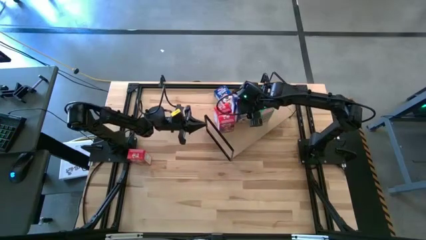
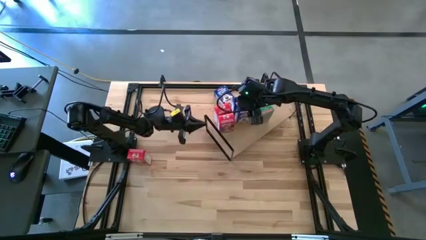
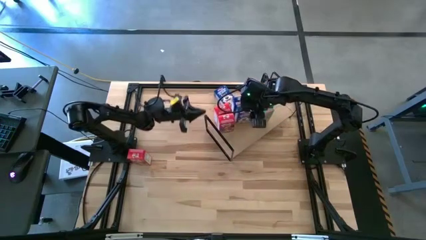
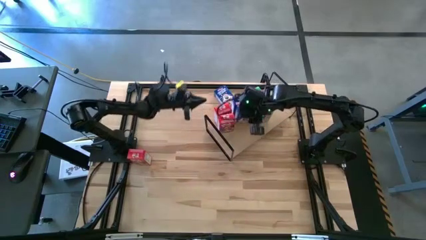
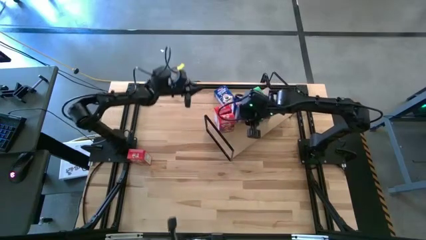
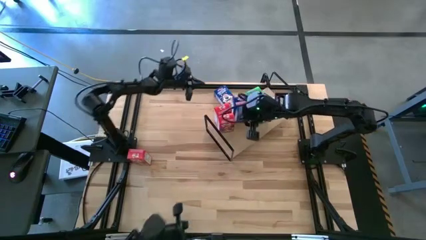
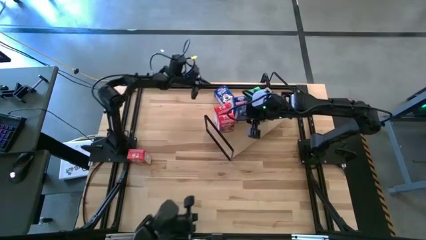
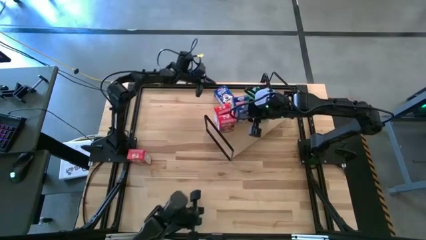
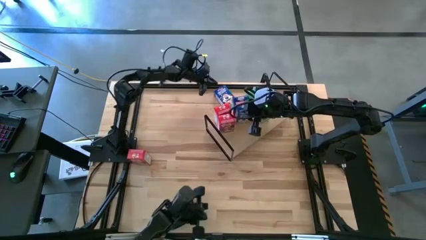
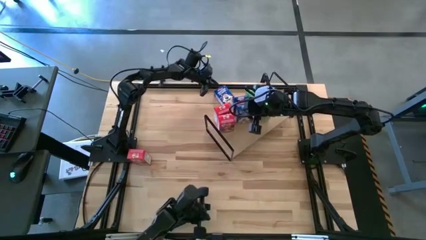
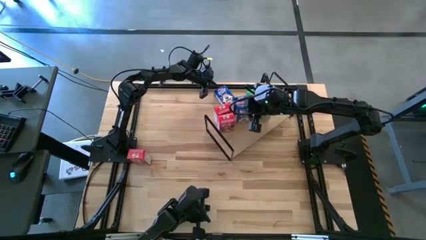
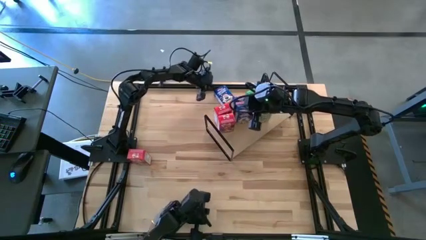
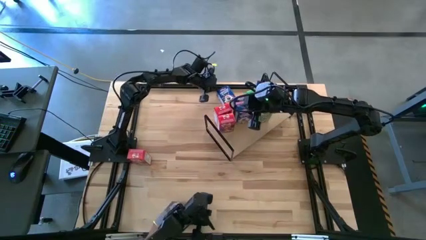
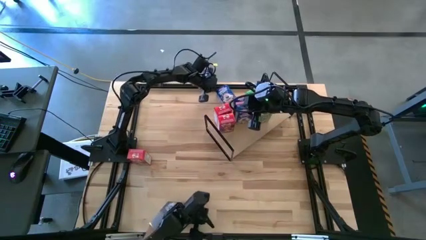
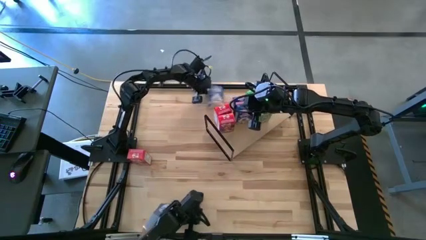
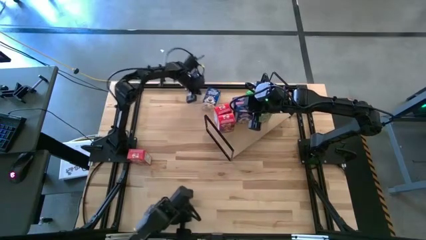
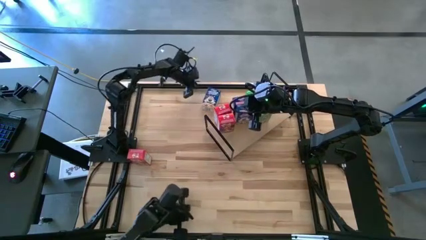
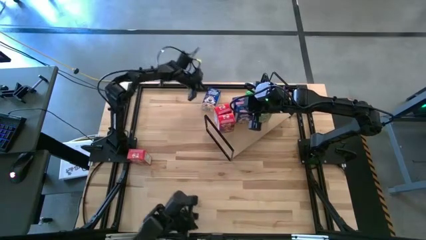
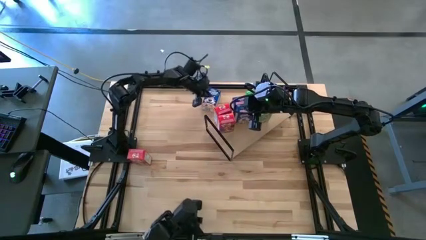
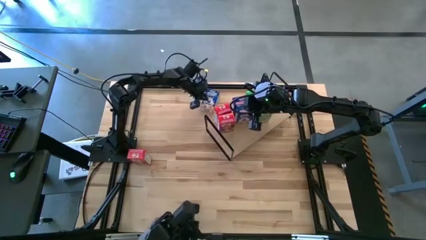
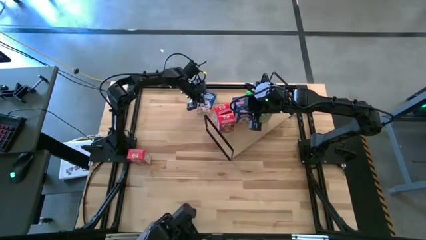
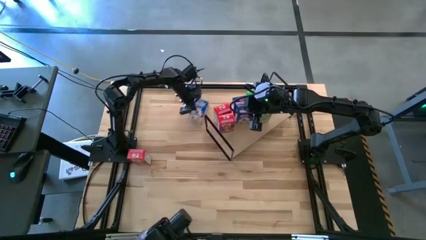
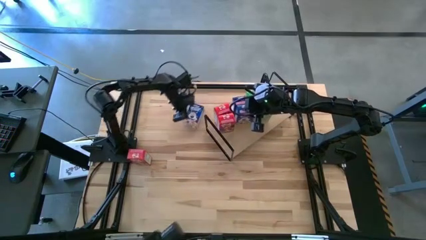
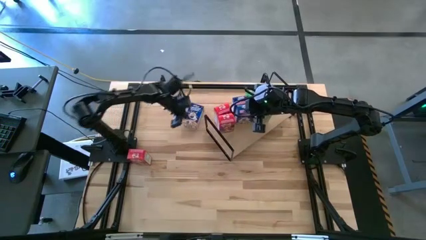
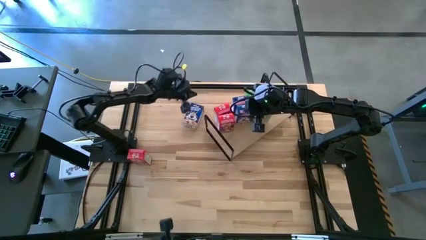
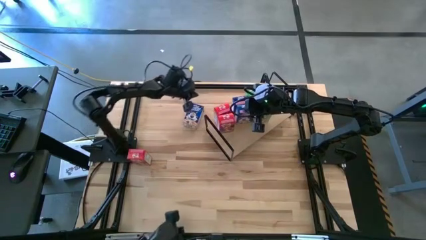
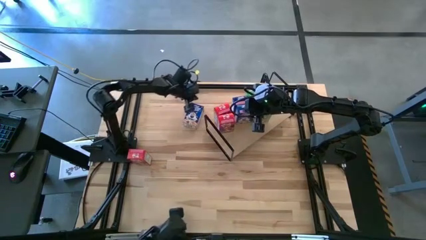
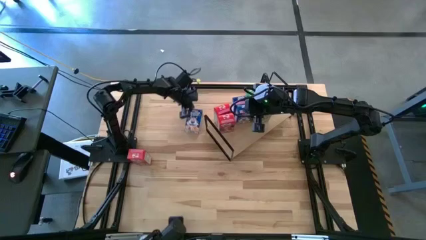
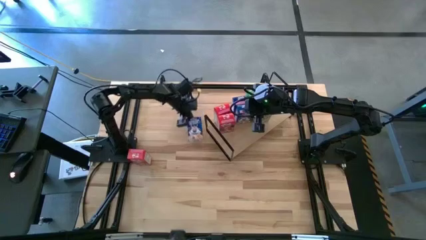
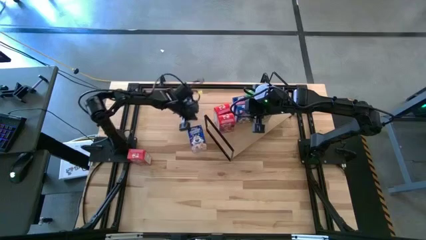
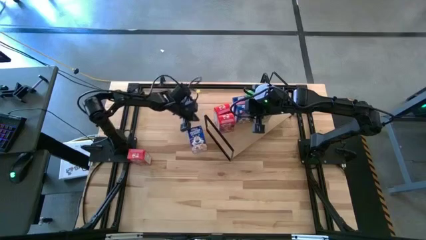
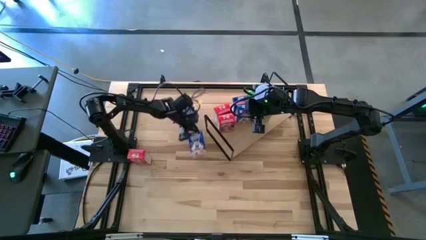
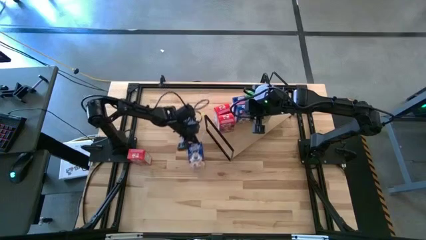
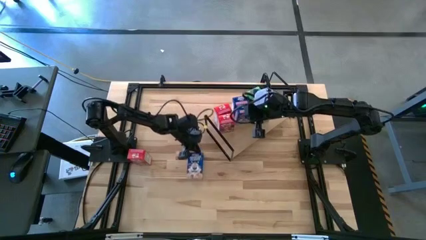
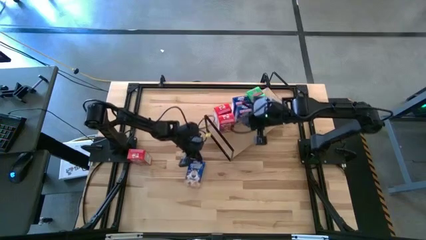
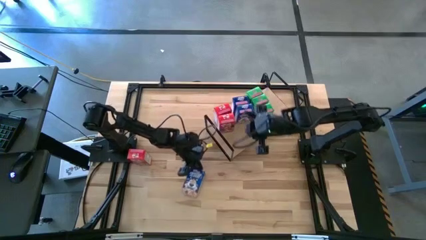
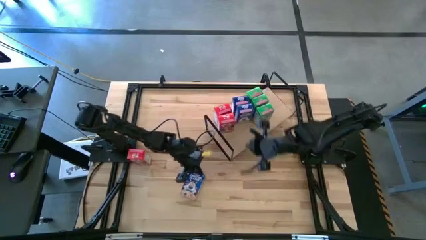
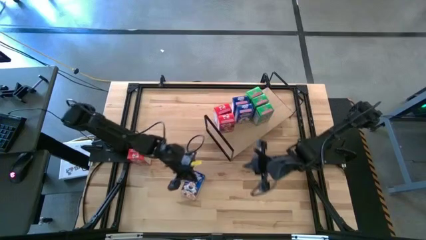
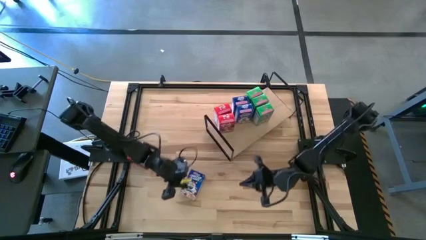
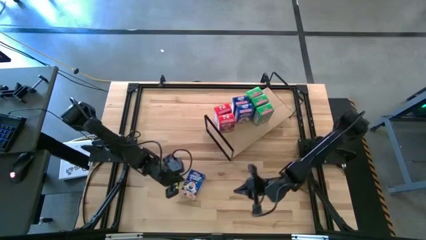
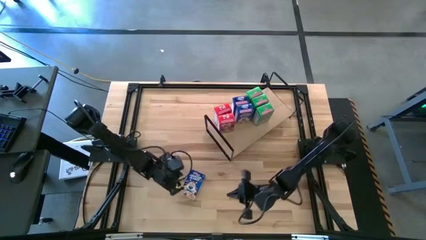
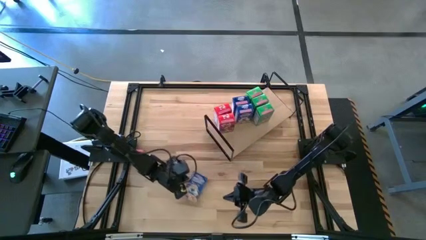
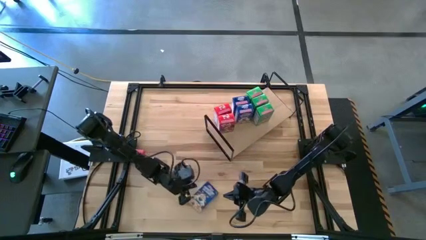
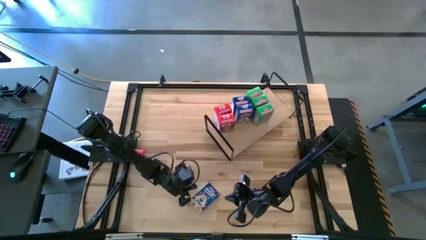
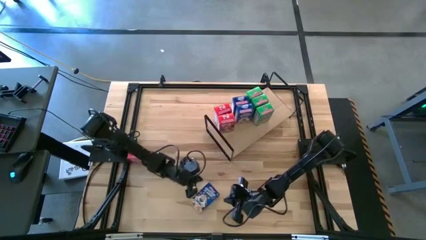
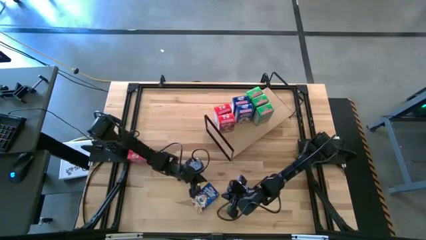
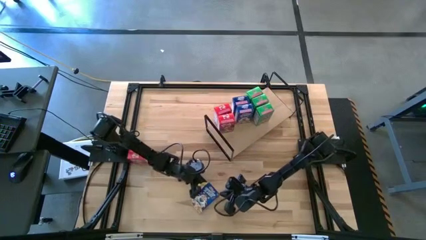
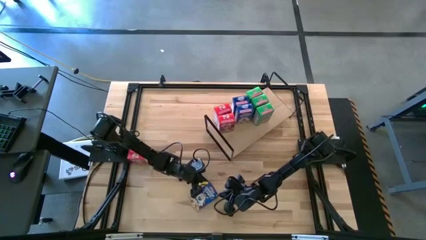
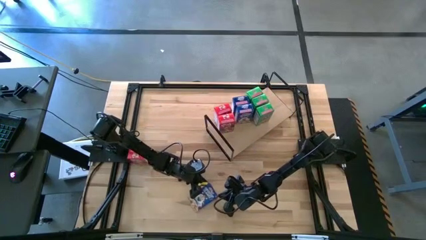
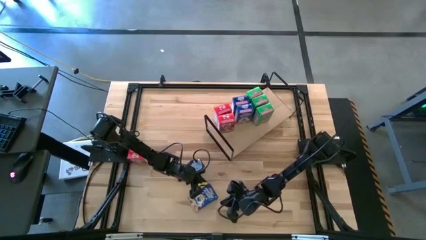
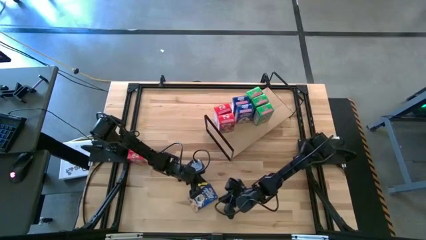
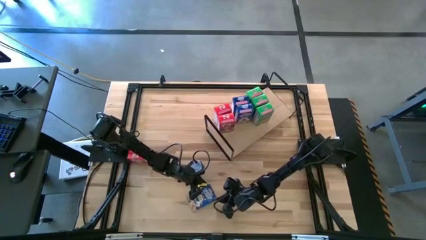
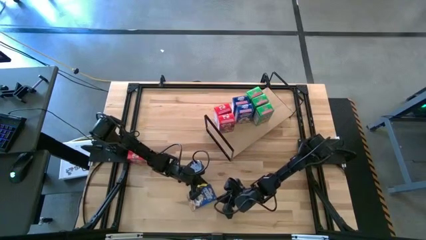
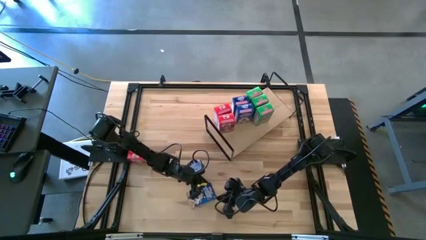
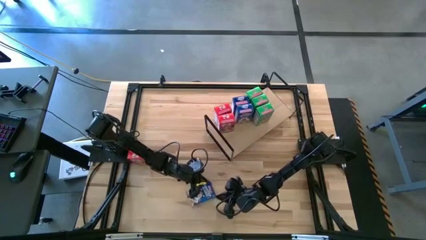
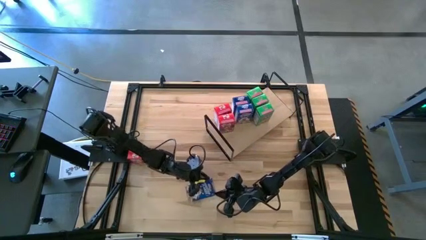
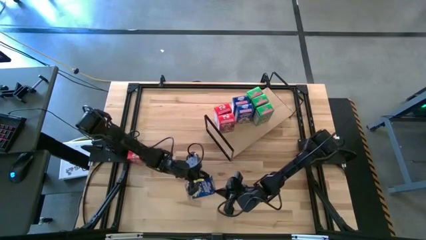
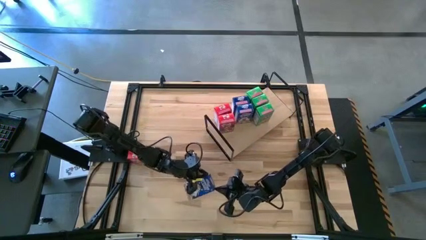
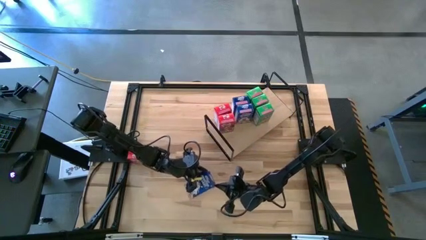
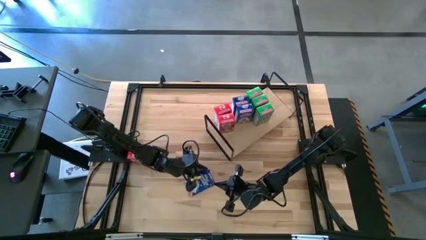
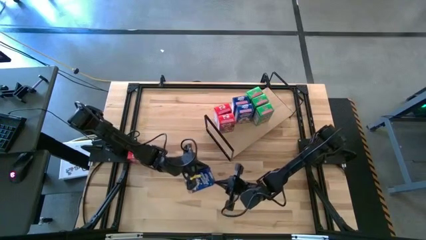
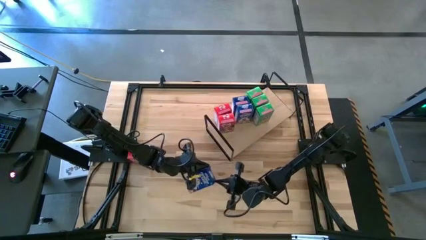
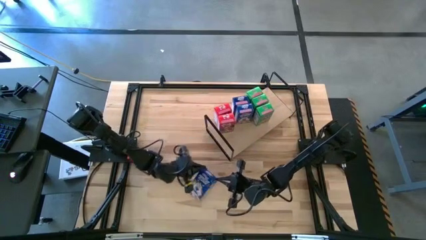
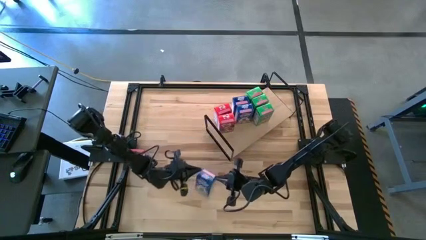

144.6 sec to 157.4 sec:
Task: Stack cereal on shelf
Put the blue cereal box on the shelf aligned with the other blue boxes

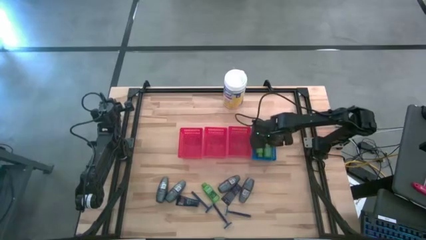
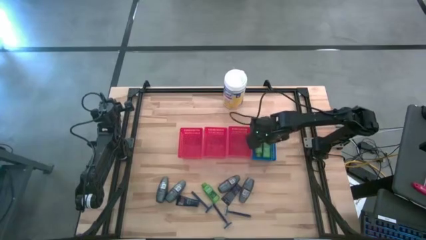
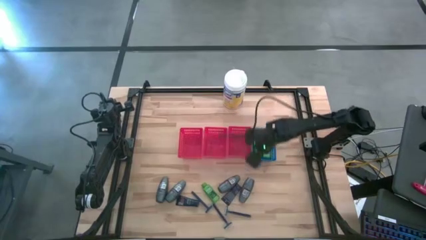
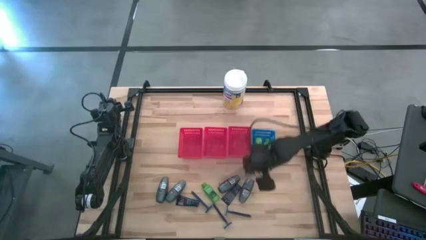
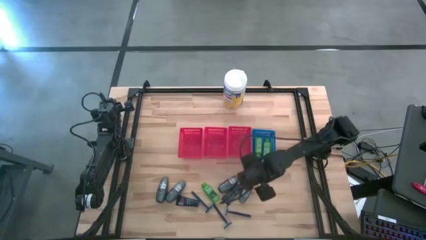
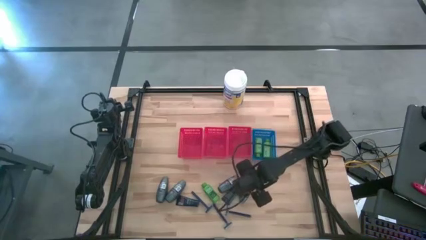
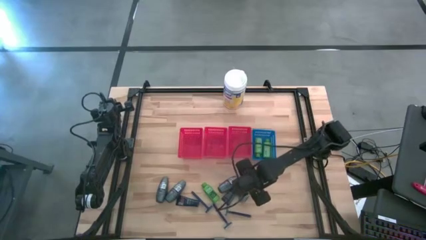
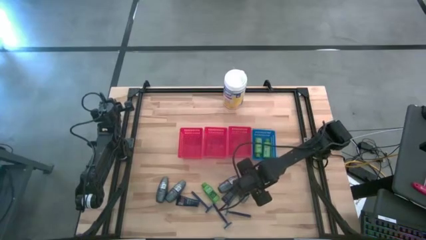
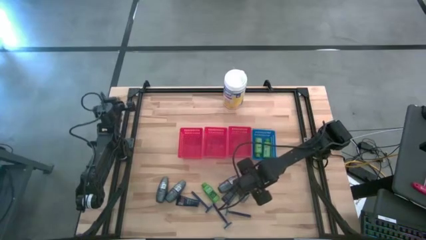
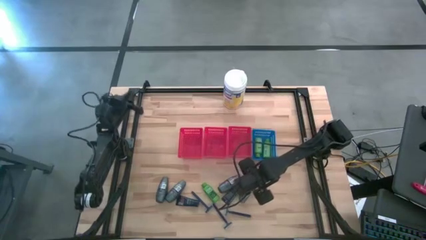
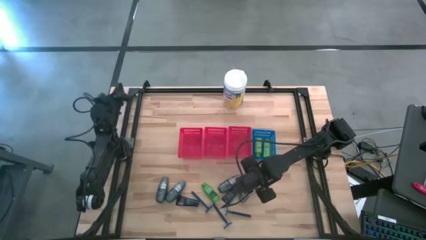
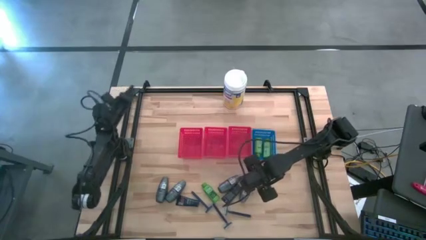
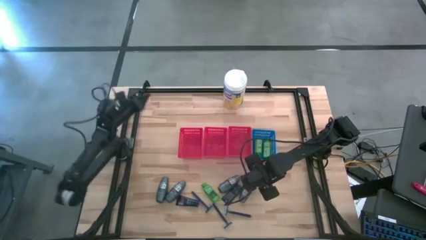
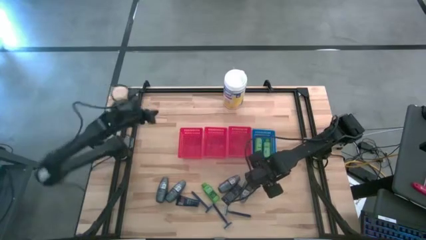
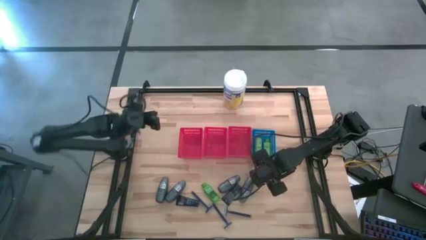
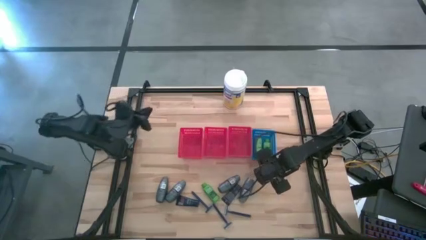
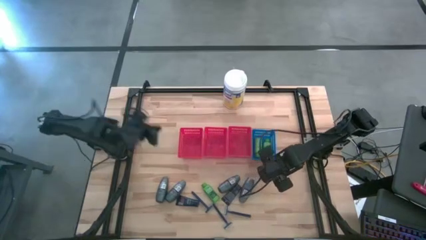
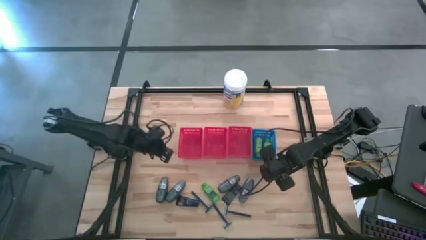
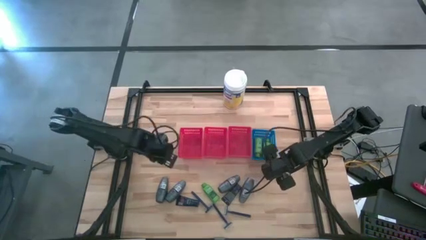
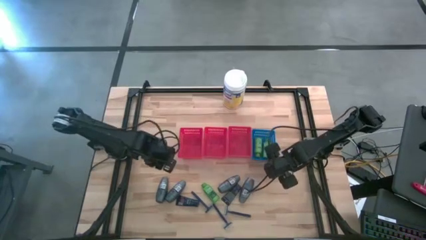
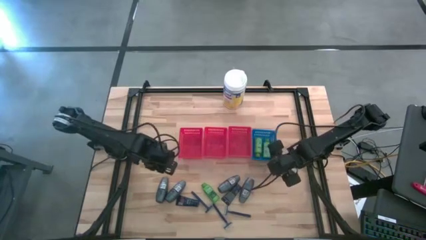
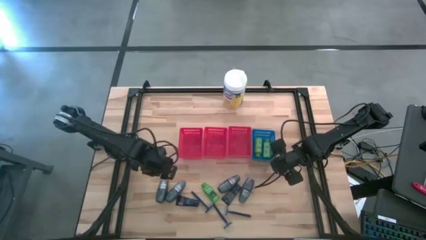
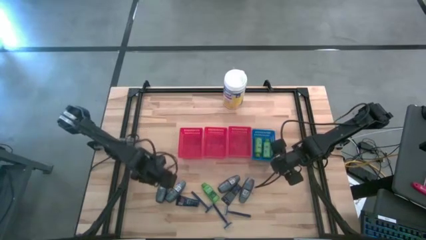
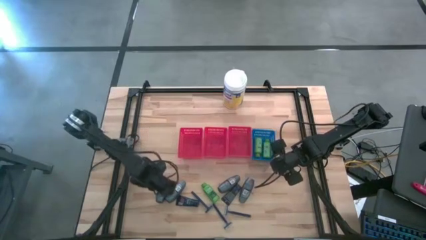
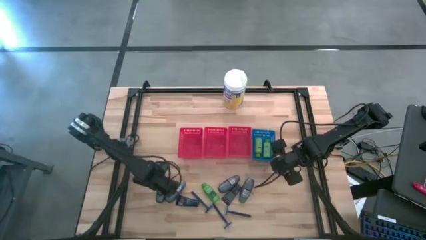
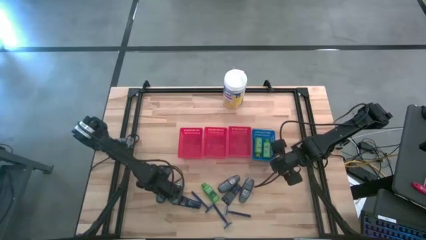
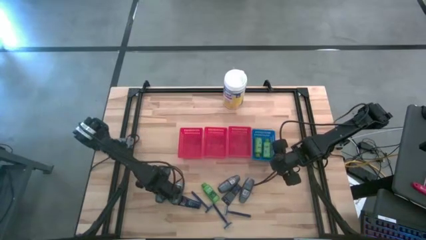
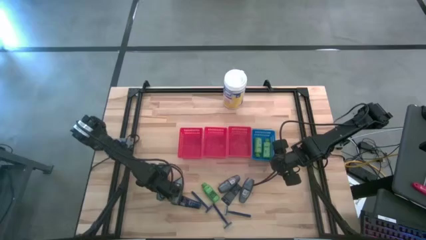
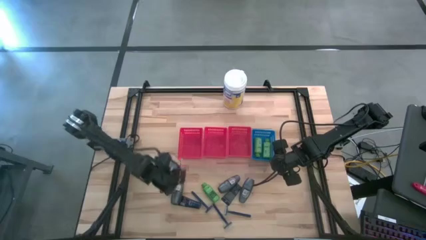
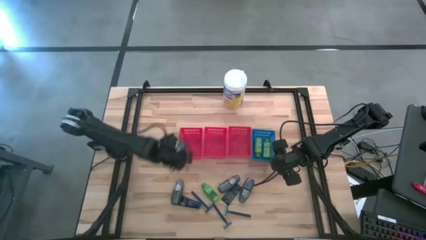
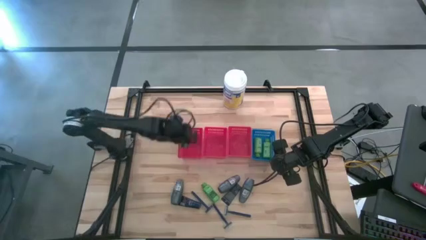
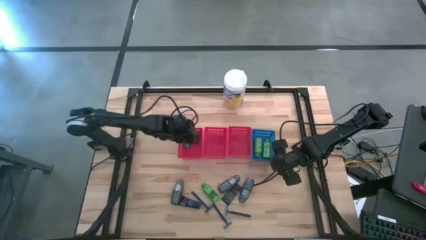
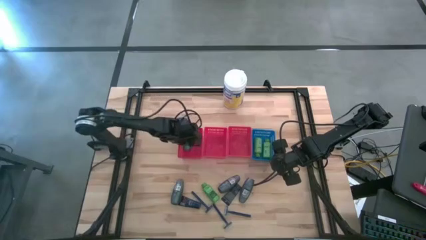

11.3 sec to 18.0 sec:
Task: Pick & Place Travel size toiletries
Put the black deodorant into the left red bin
